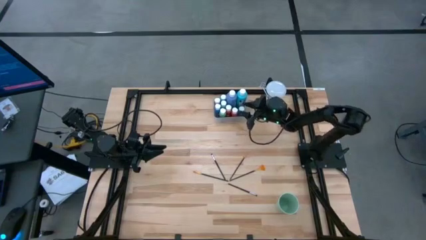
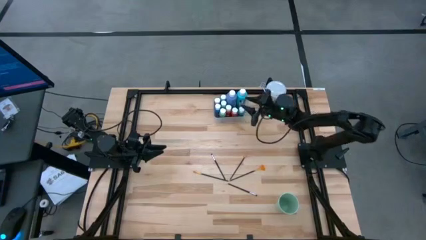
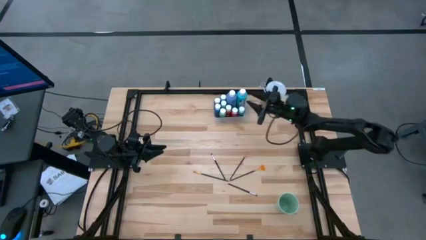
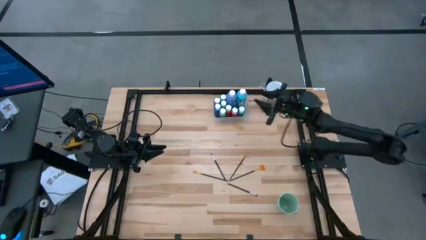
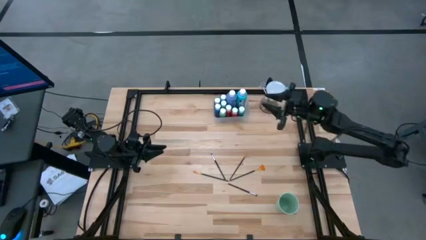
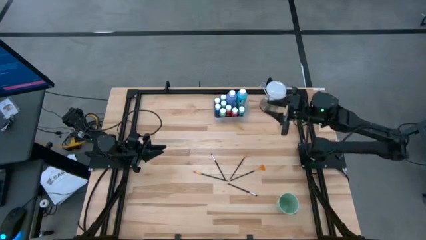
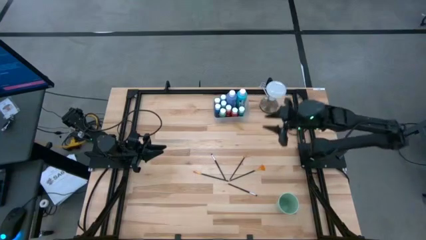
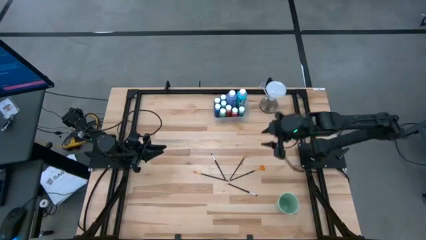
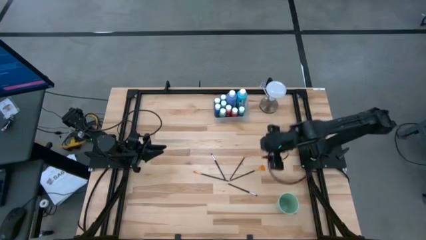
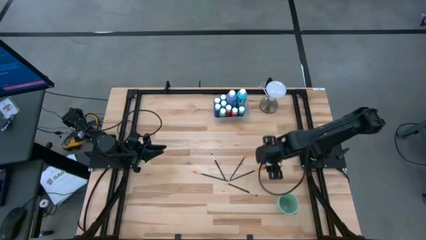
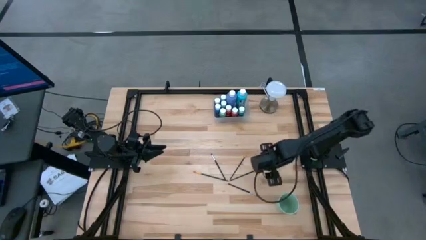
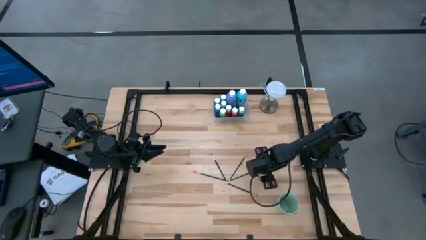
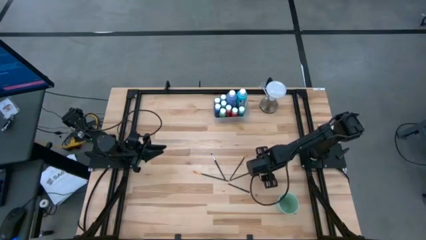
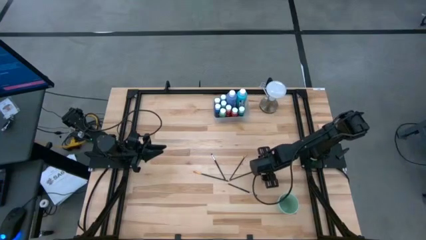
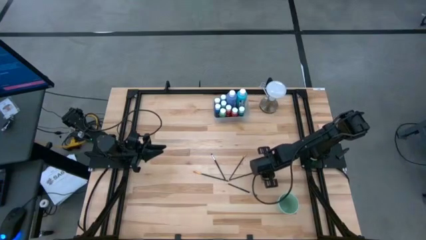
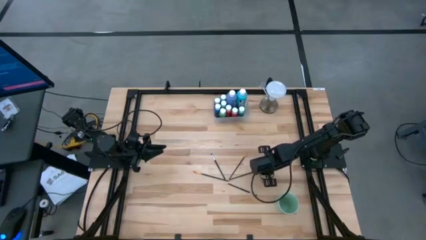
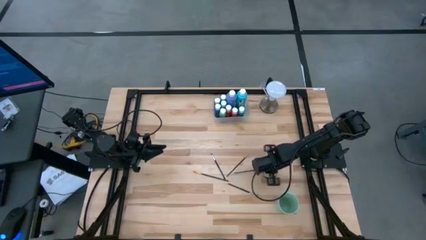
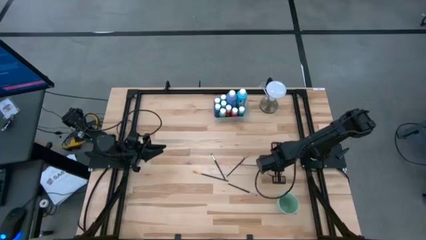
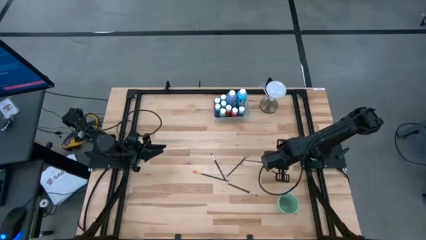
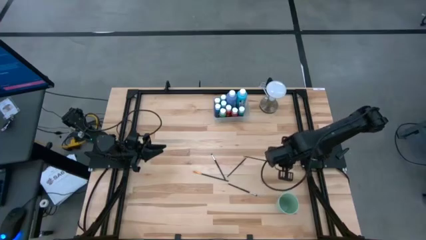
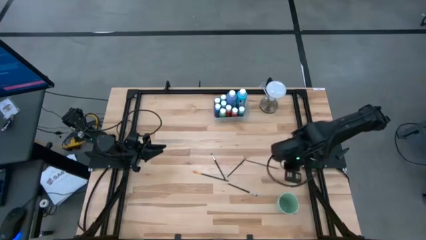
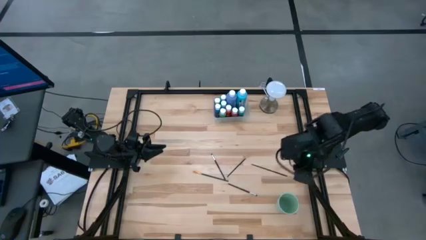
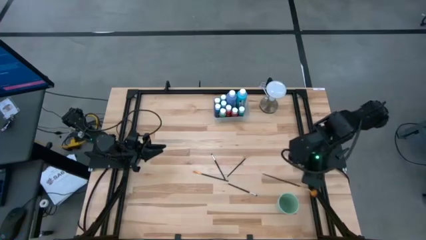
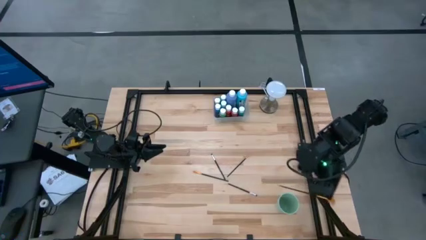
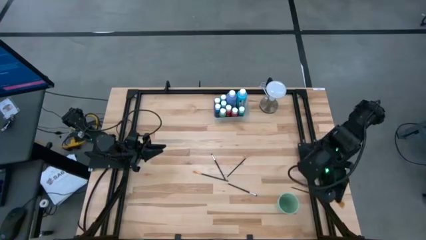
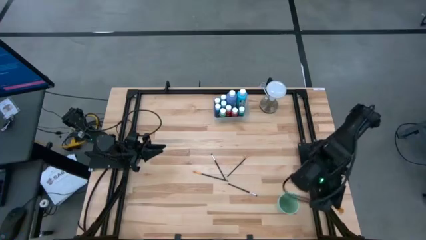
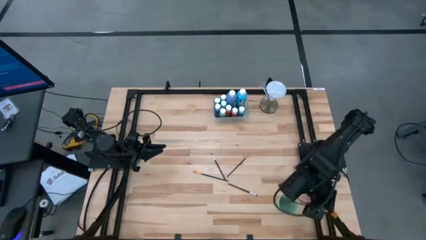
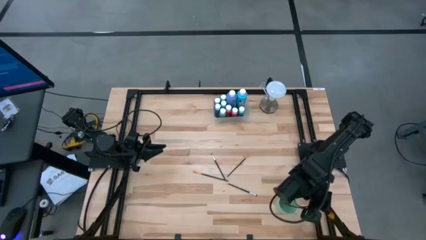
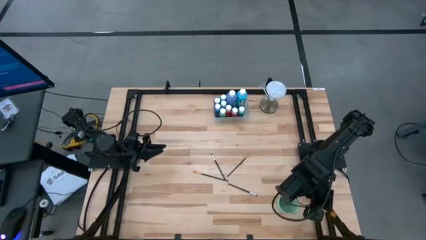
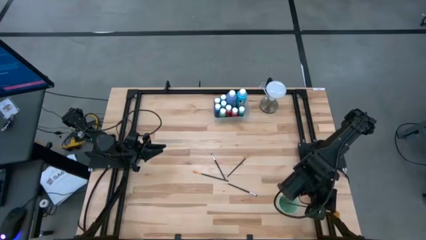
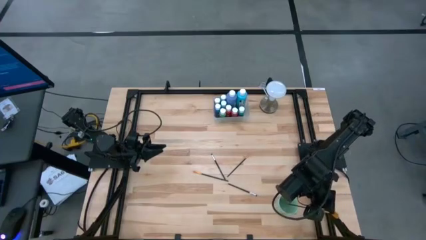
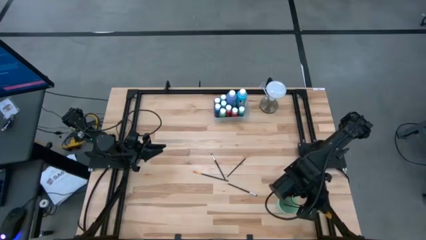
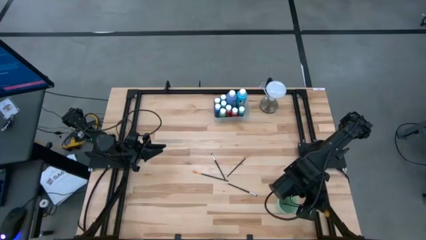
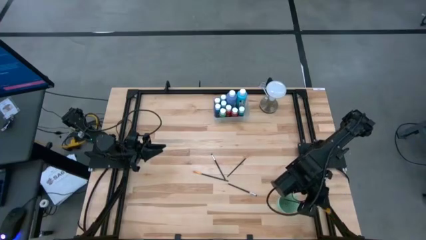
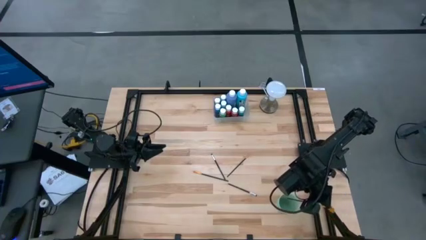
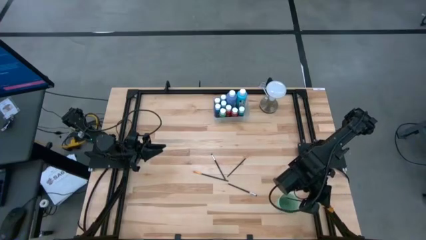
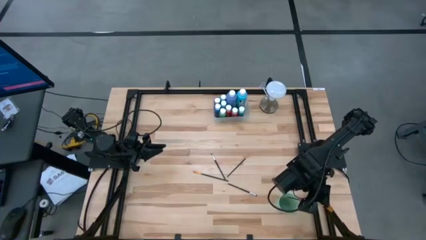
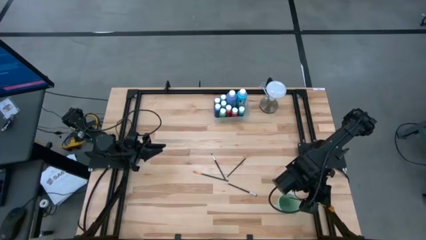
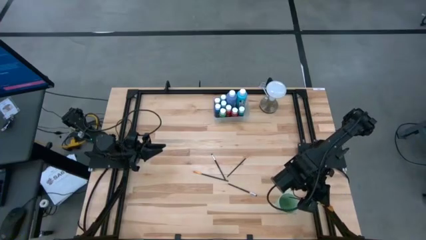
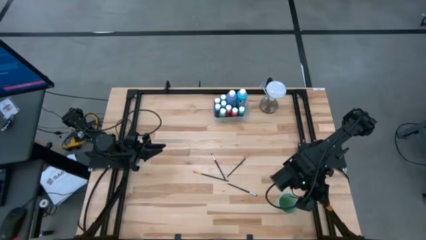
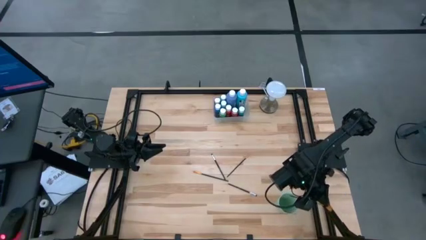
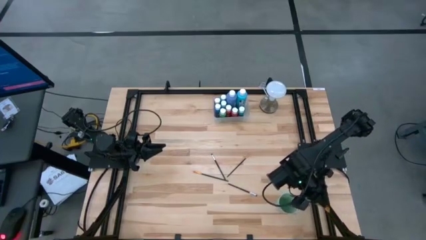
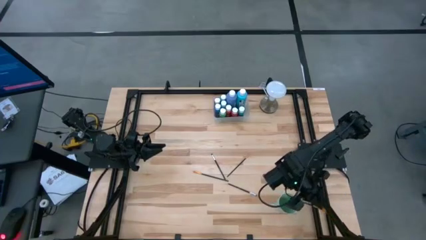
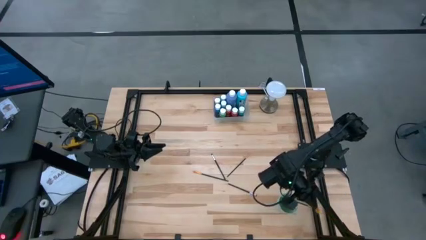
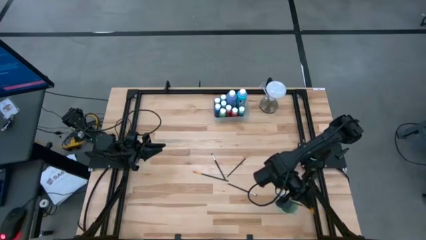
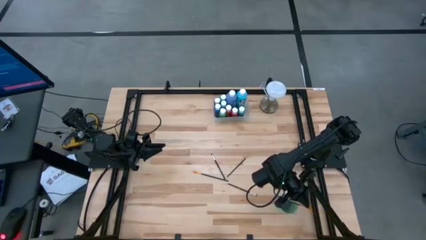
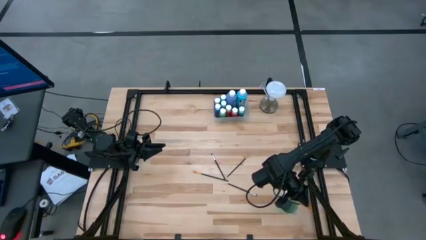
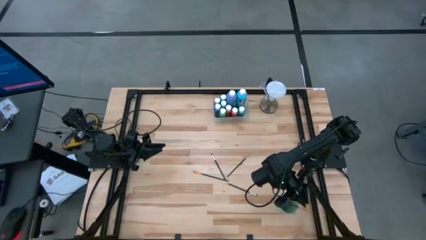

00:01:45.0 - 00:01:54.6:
Task: Pick & Place Paint Supplies
Put the orange paintbrush into the green cup

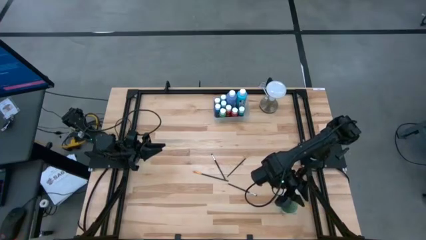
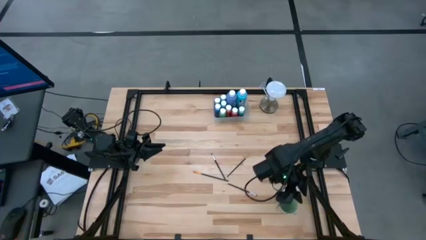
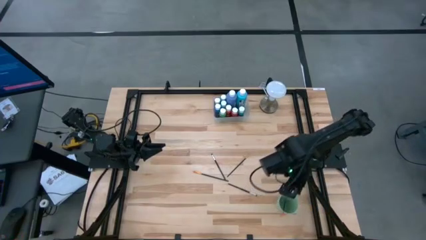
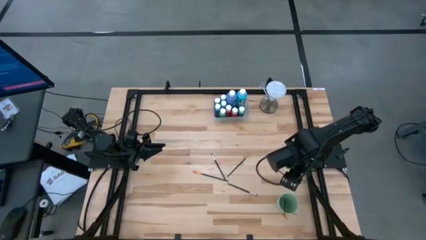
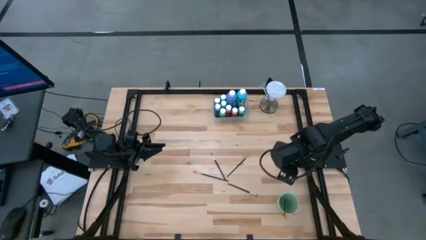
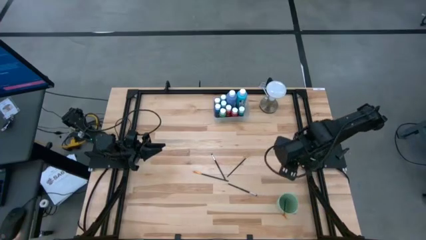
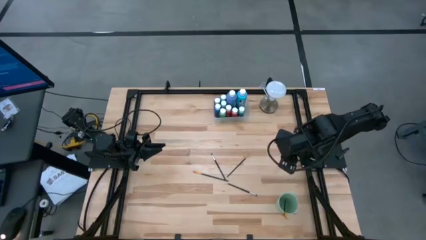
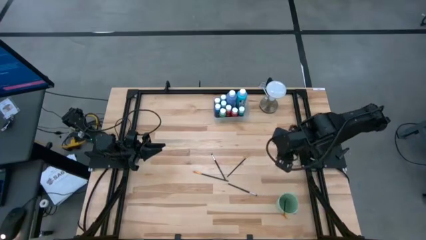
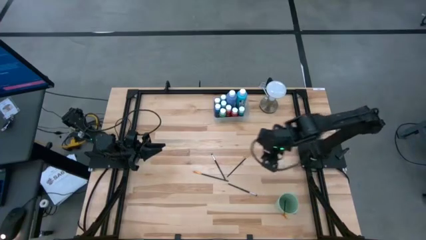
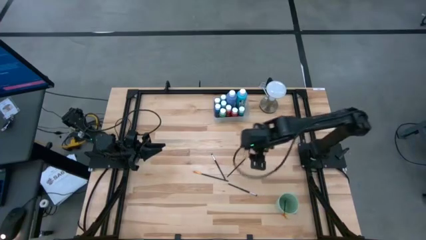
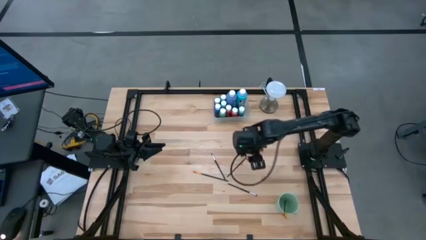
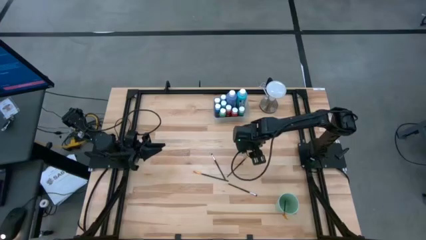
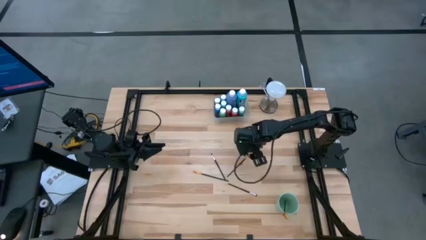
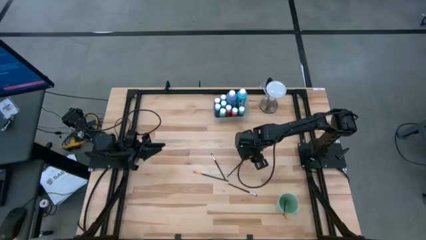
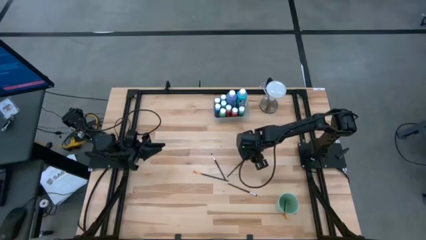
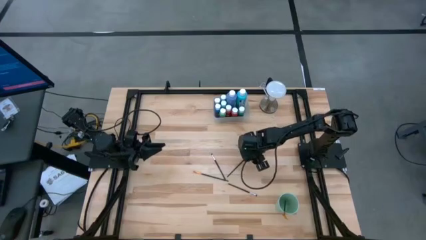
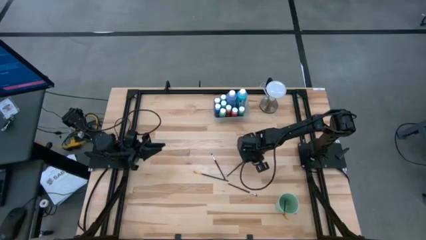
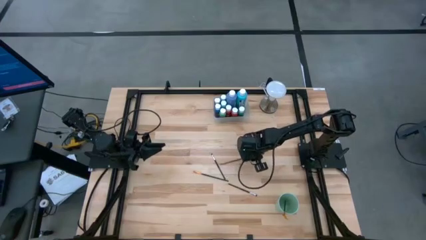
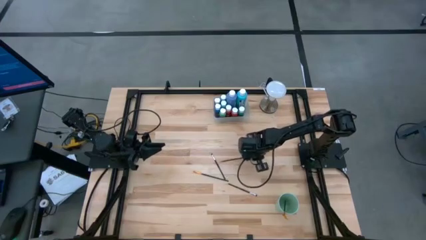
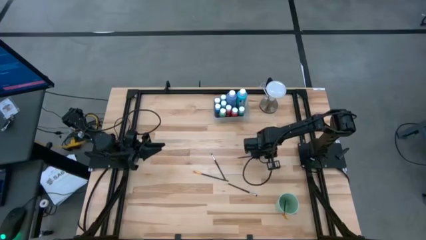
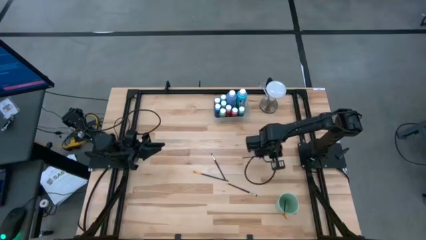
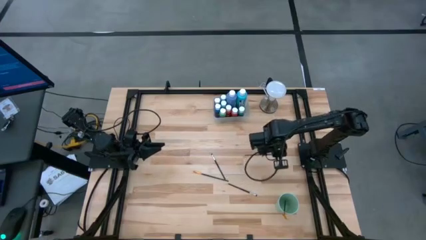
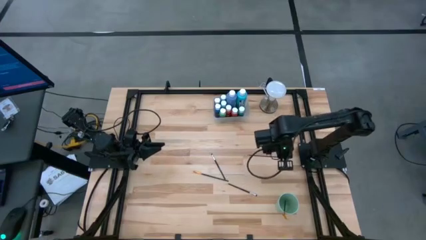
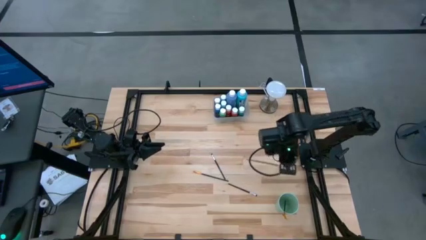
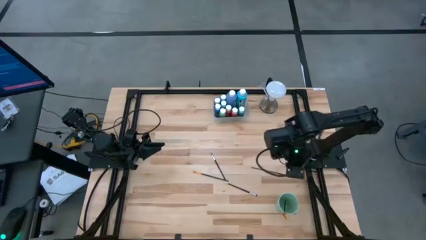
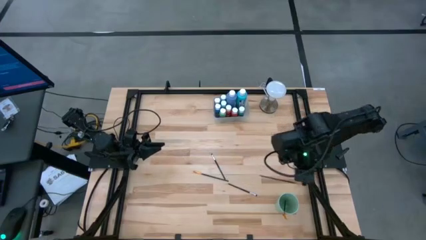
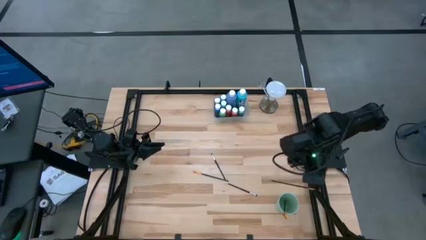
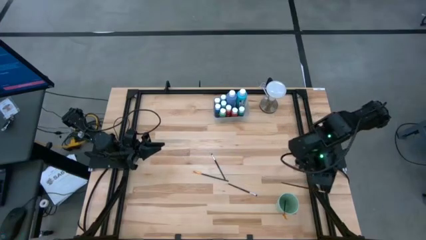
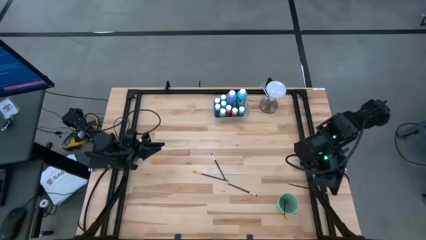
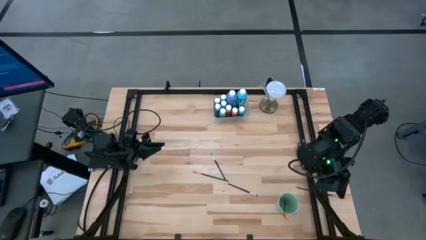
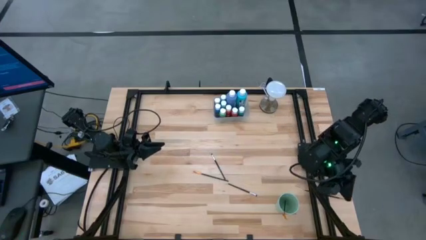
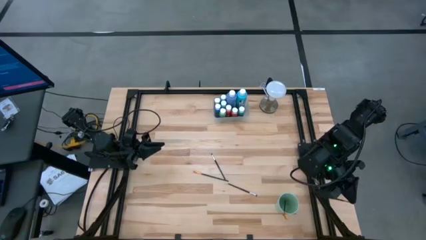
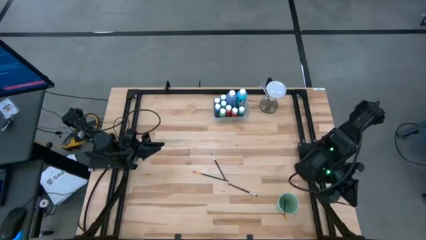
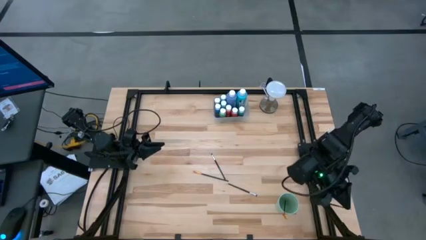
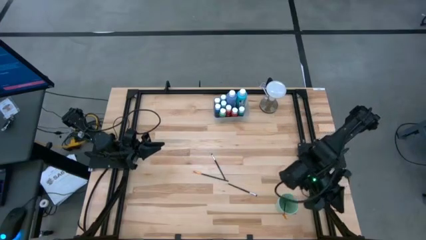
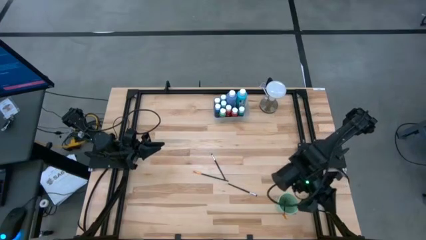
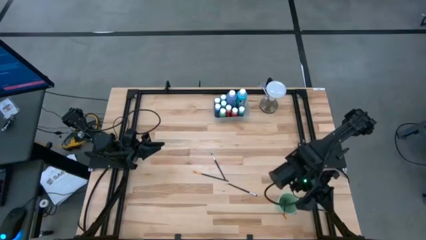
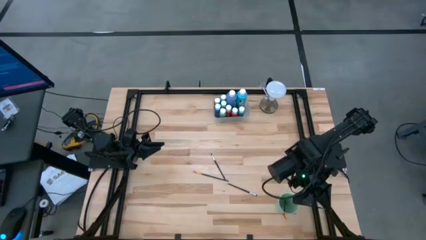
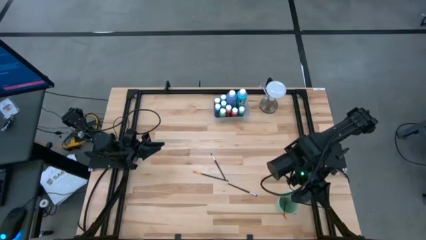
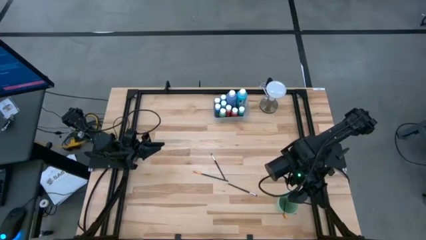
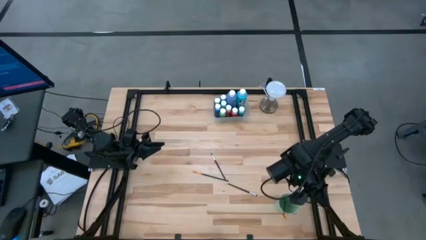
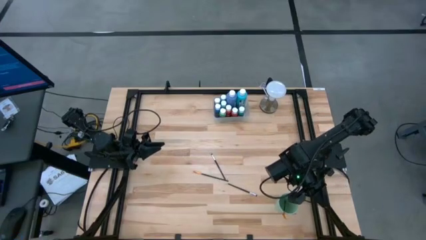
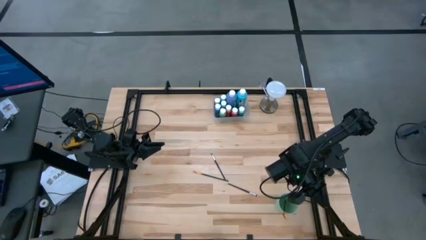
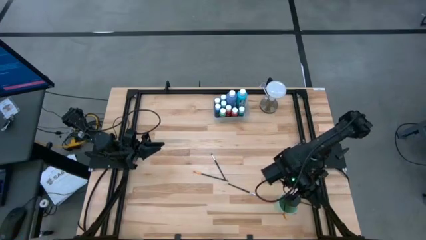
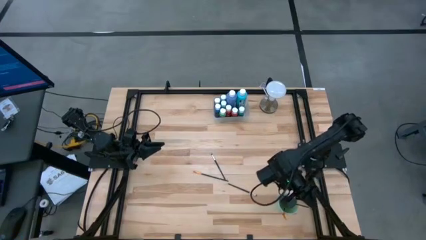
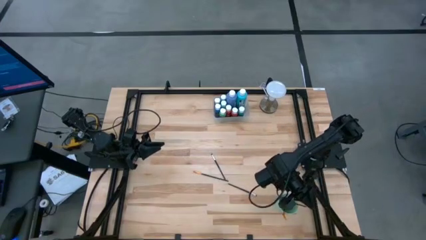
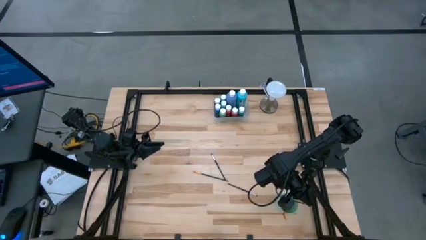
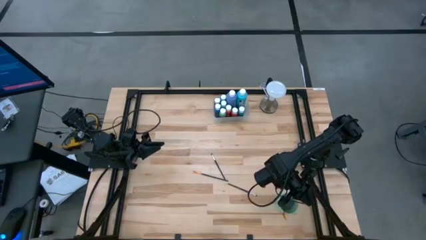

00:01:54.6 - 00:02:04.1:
Put the orange paintbrush into the green cup
